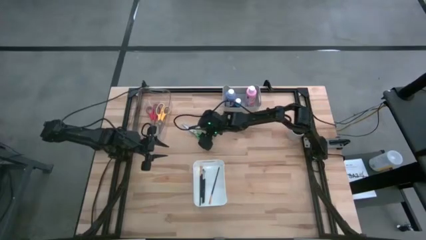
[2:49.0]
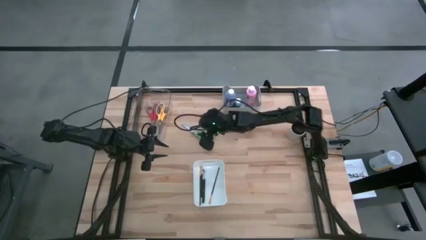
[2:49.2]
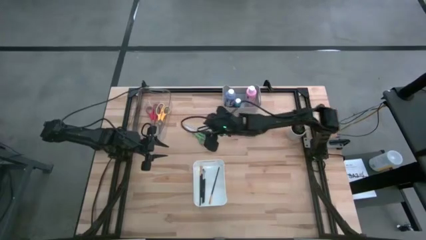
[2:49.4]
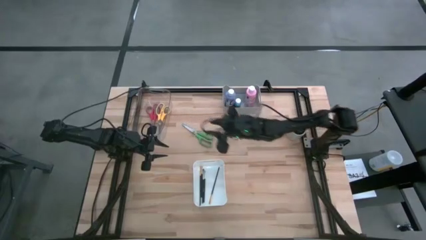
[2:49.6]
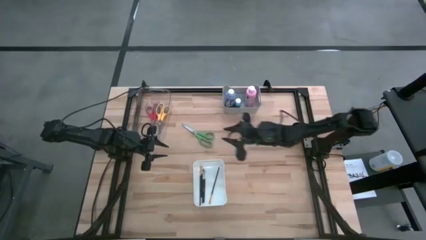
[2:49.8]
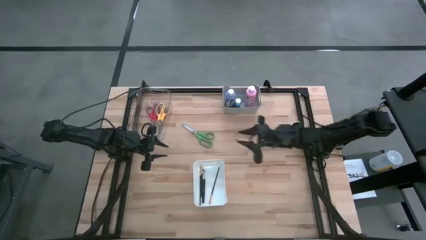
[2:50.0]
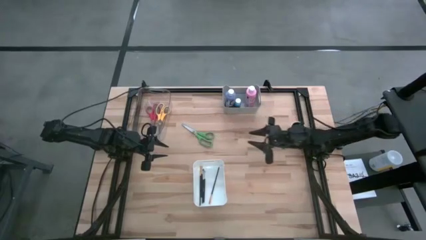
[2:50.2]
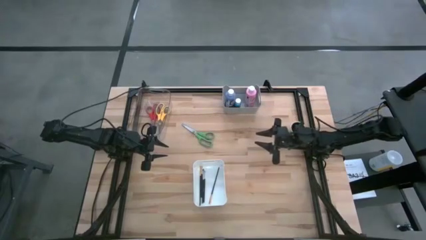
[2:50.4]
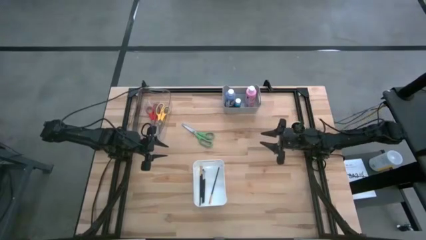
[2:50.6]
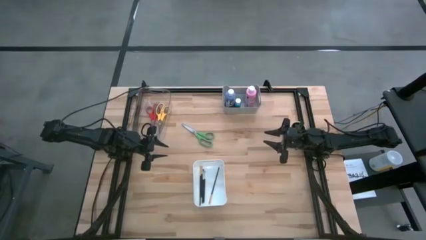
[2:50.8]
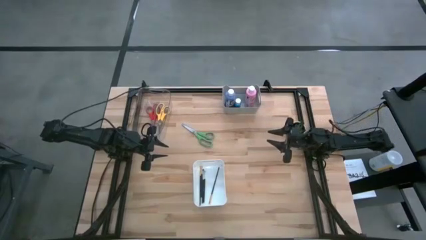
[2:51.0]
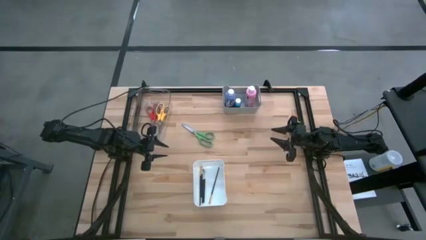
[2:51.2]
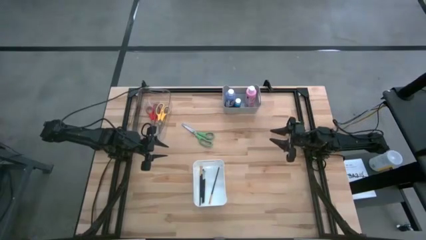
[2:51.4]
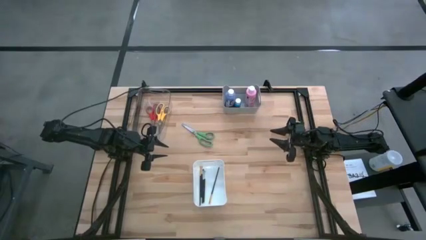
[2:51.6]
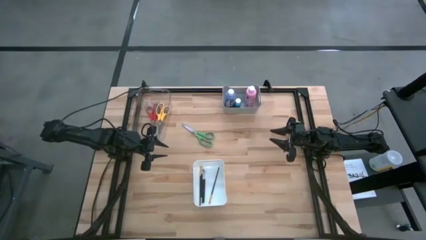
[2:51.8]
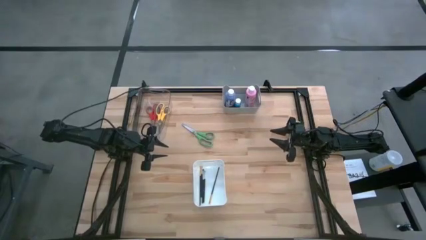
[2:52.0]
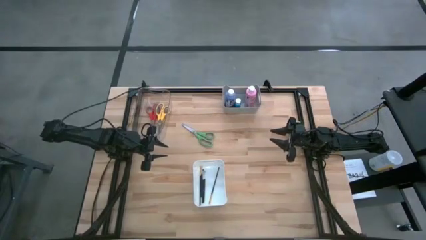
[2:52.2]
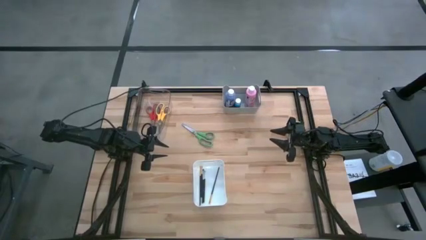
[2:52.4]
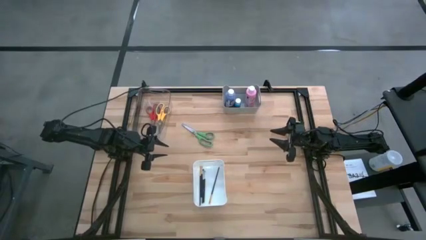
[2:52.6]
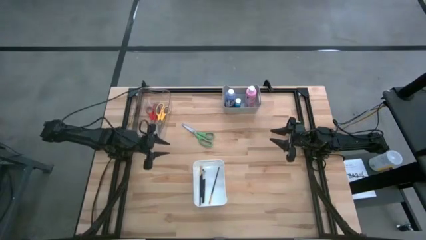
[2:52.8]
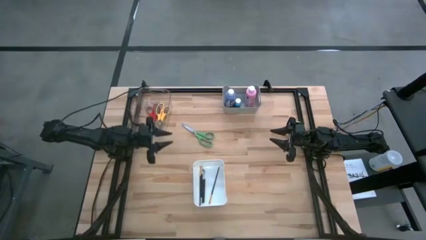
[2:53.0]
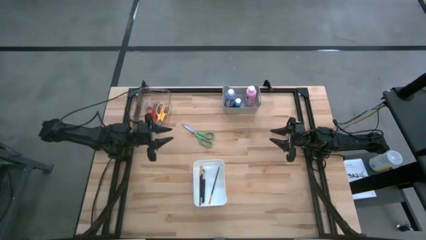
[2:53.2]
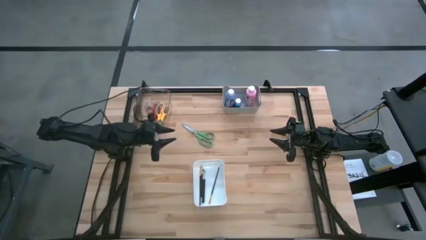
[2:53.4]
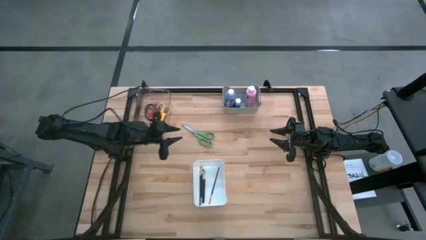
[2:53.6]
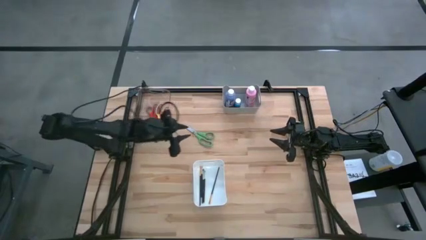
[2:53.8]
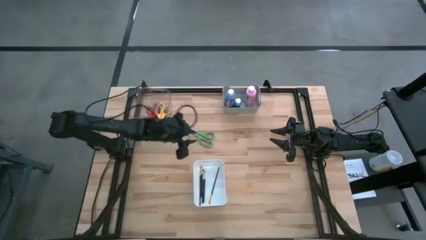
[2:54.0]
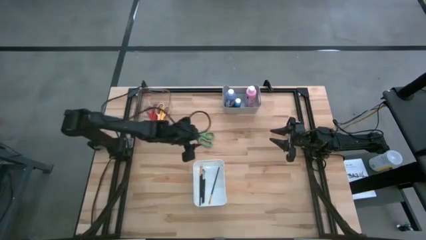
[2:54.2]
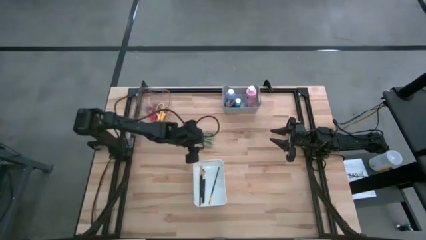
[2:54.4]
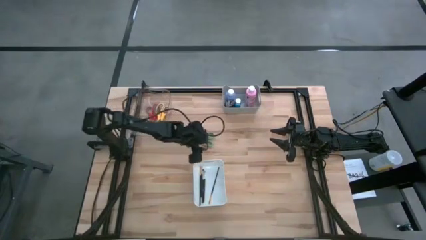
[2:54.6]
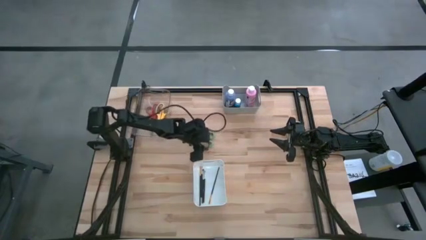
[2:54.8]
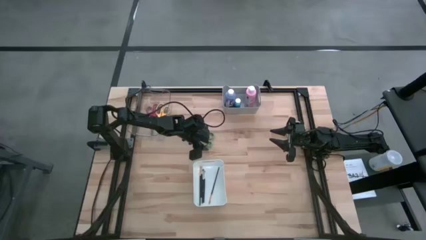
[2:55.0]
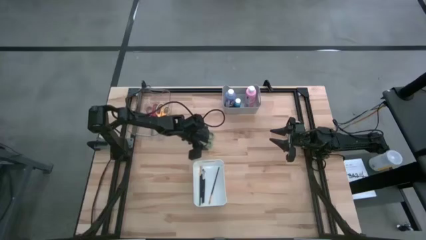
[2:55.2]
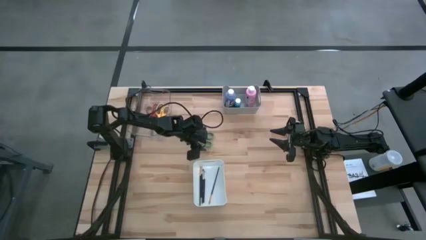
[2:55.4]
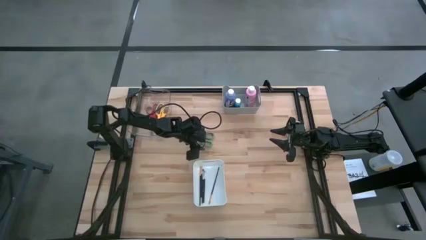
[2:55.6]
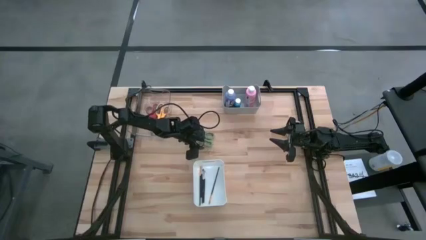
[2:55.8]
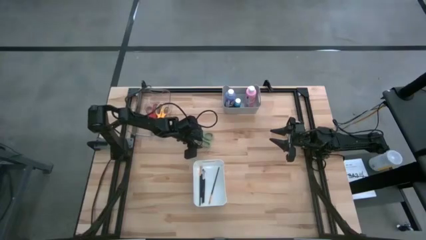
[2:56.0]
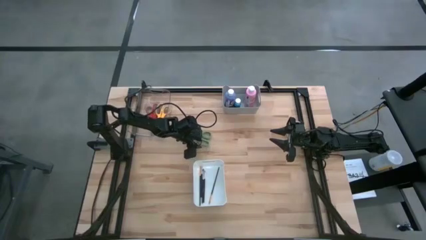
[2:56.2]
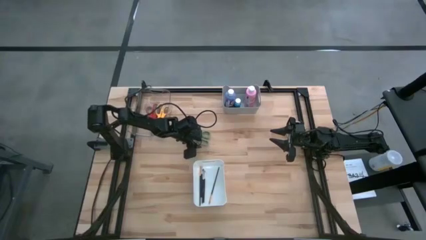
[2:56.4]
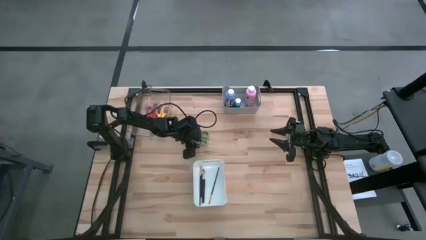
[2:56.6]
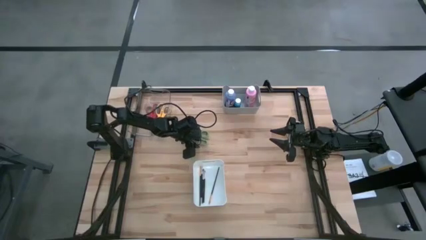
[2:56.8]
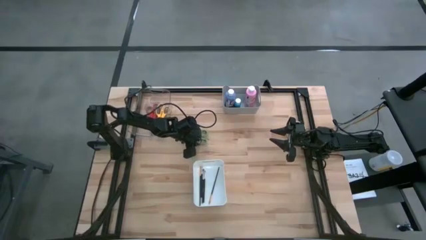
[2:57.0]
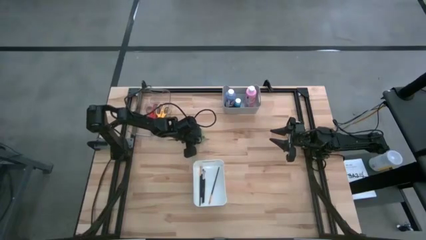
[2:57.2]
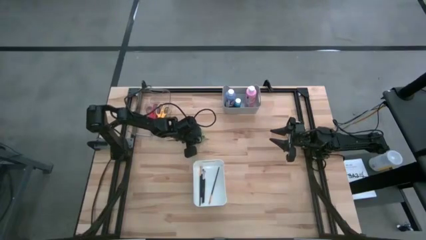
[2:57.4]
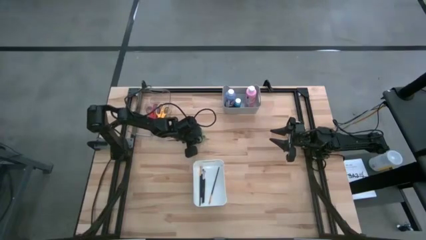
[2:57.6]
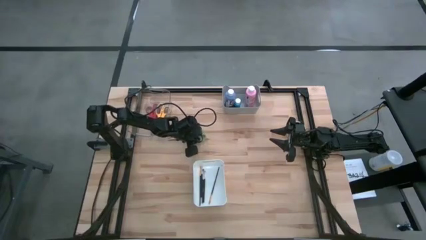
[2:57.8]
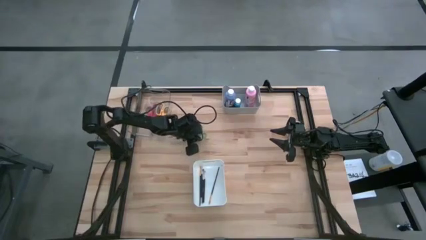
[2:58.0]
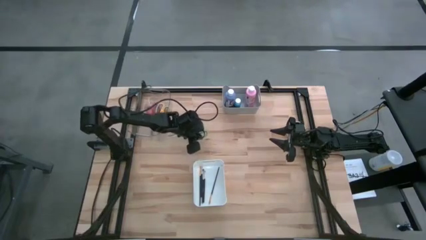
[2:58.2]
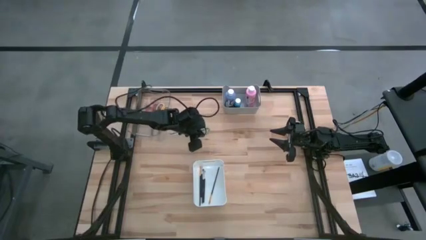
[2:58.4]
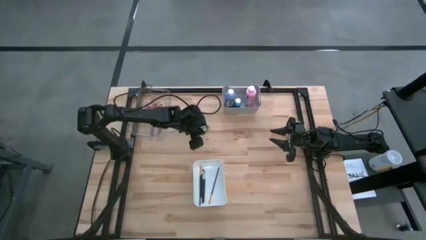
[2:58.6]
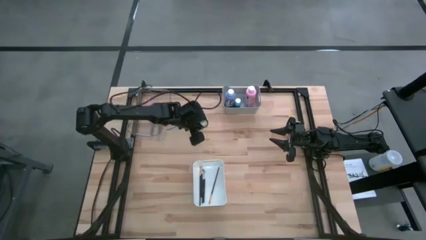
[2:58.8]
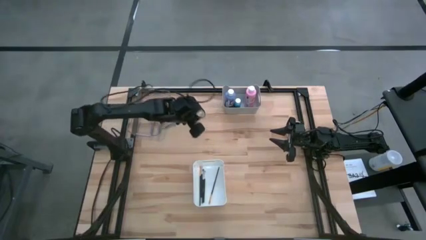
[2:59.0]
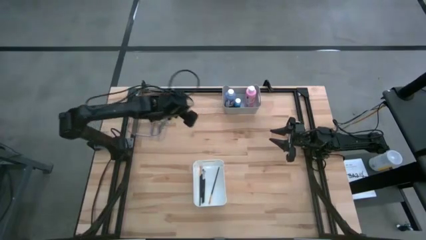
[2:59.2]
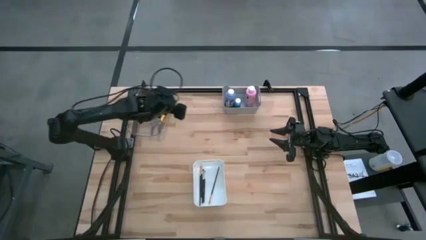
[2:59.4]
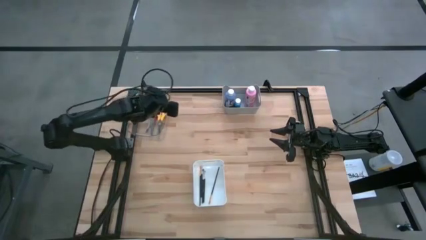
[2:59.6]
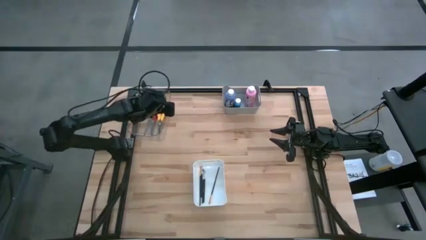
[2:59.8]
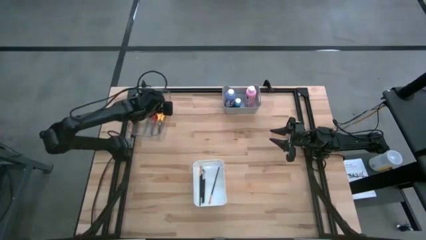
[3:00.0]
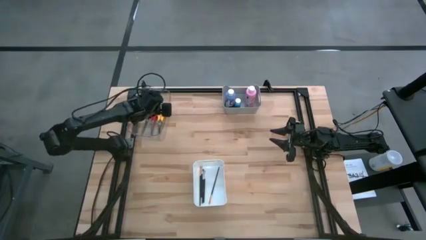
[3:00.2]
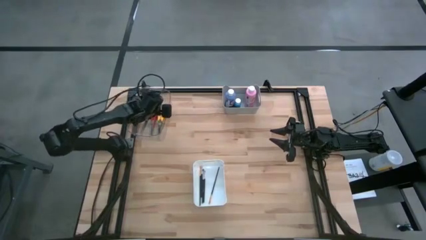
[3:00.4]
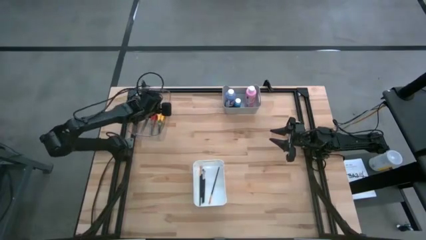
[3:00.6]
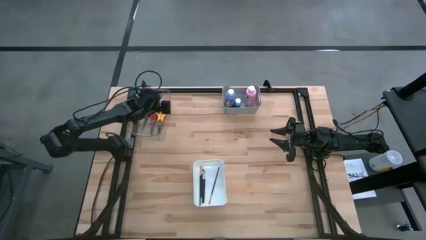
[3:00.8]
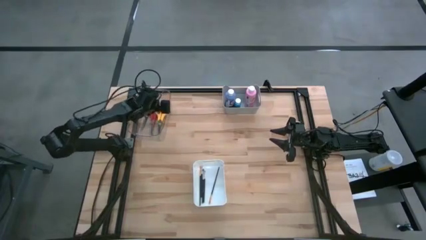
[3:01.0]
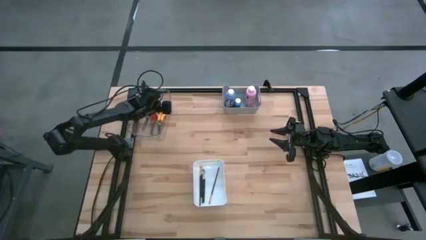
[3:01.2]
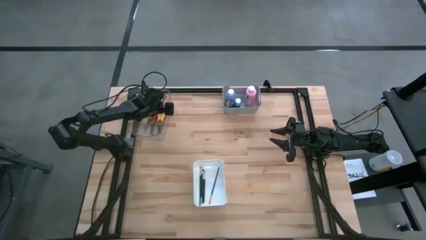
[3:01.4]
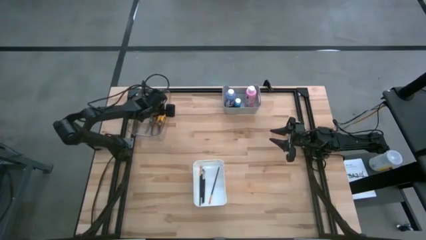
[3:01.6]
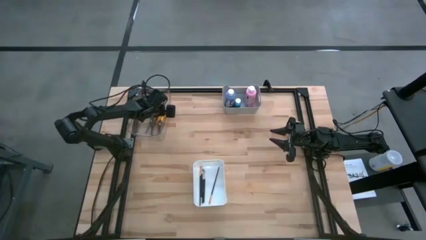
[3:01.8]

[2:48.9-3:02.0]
Task: Pick & Place Paint Supplies
Put the green scissors into the transparent bin

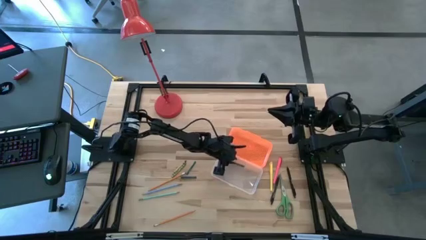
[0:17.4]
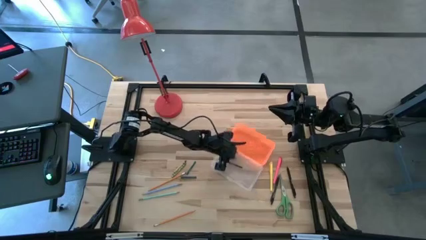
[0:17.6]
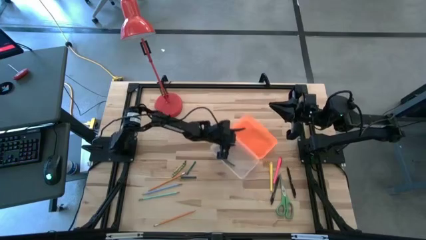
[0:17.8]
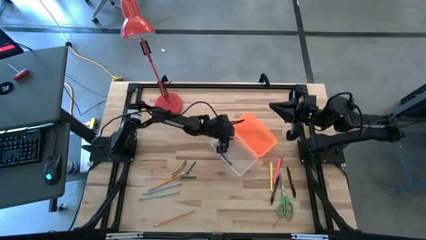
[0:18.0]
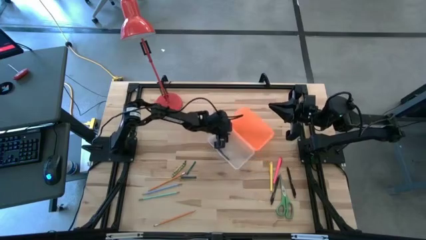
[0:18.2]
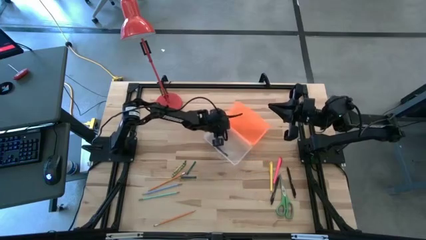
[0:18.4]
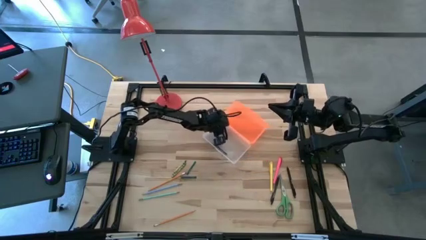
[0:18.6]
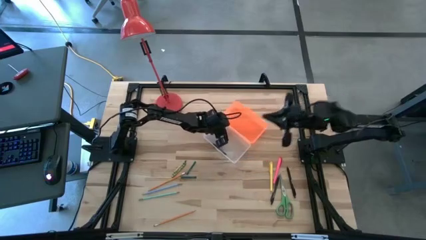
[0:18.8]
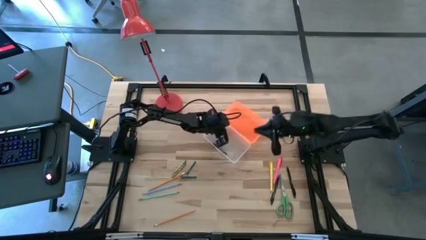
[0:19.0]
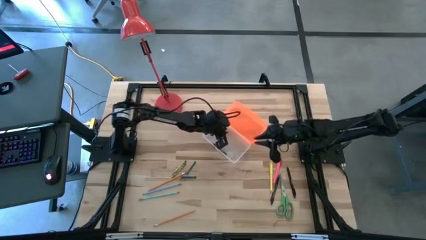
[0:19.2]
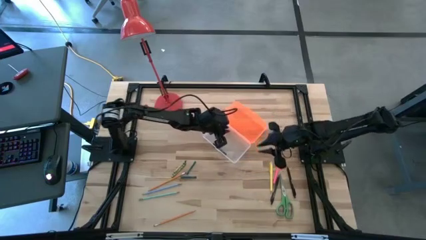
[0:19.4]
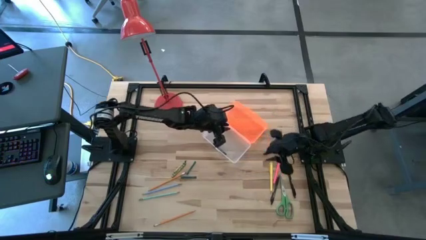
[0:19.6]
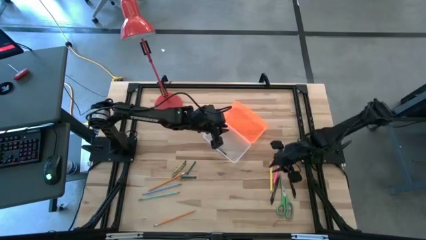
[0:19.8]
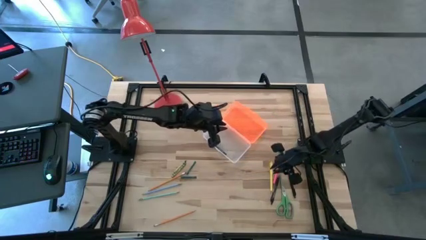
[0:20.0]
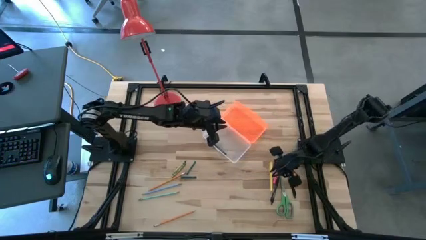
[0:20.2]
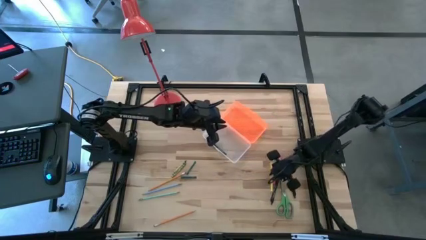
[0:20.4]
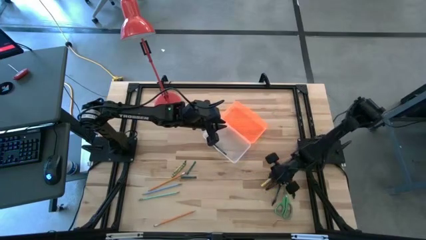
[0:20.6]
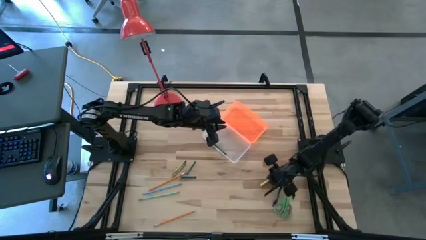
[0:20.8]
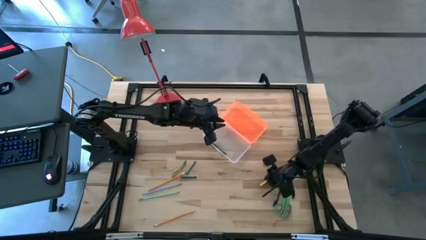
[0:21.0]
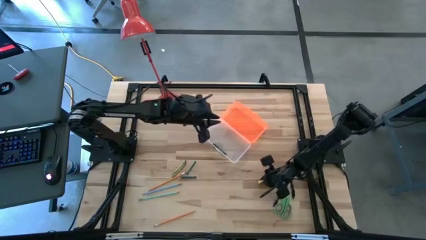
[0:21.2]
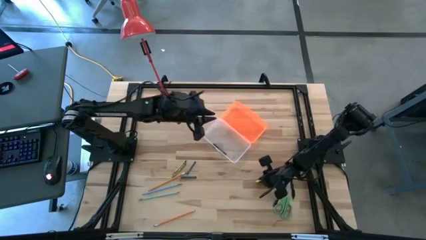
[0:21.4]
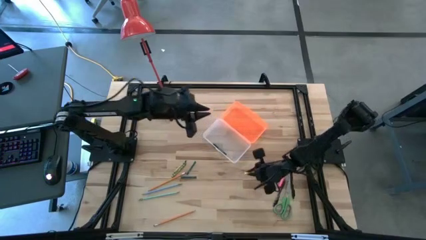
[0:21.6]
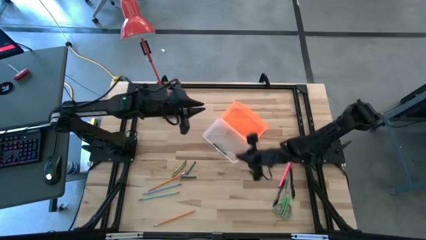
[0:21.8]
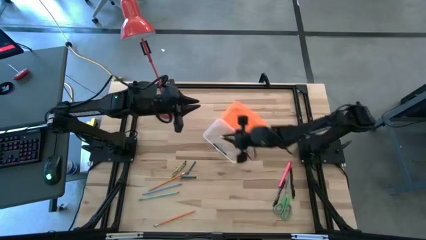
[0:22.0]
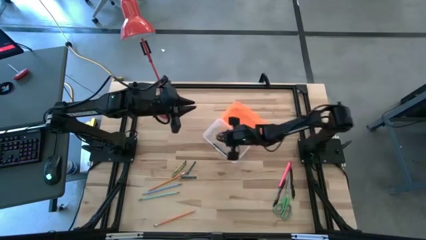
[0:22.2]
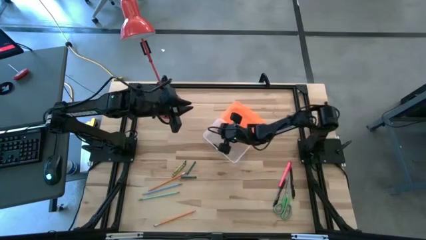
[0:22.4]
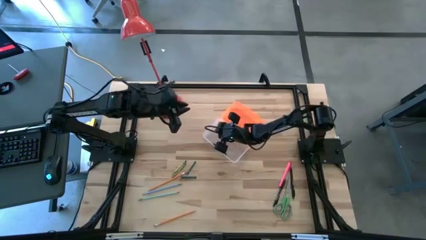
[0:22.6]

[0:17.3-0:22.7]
Task: Pick & place school supplies into a supply box
Put the yellow pen into the supply box
